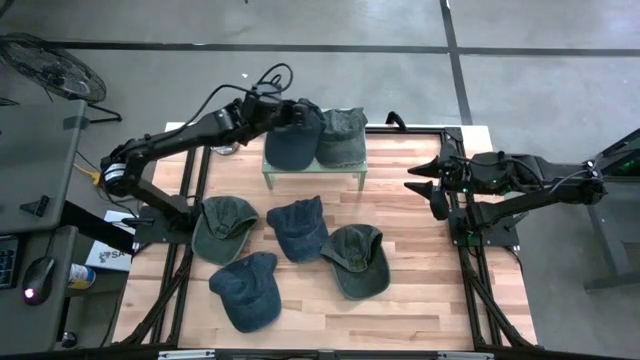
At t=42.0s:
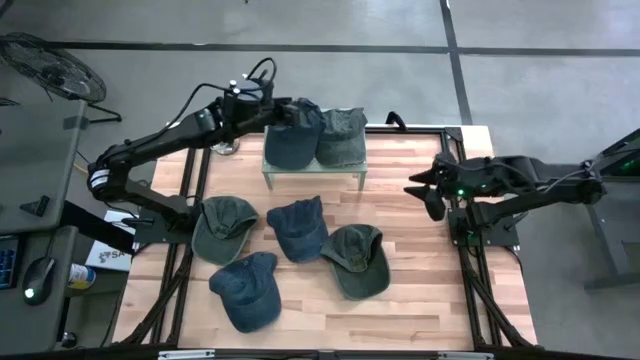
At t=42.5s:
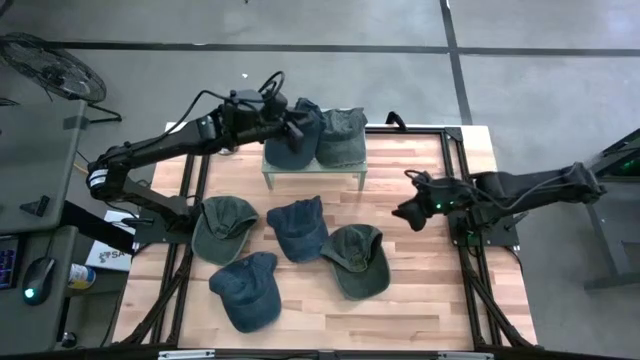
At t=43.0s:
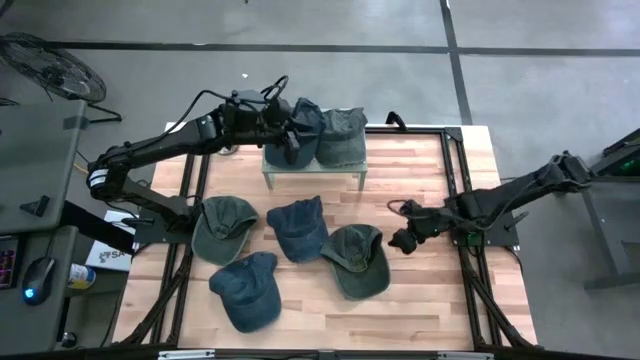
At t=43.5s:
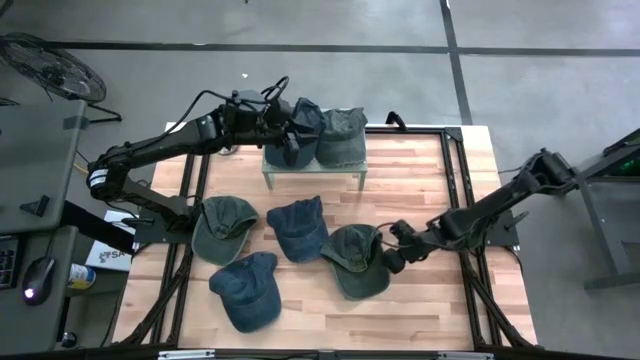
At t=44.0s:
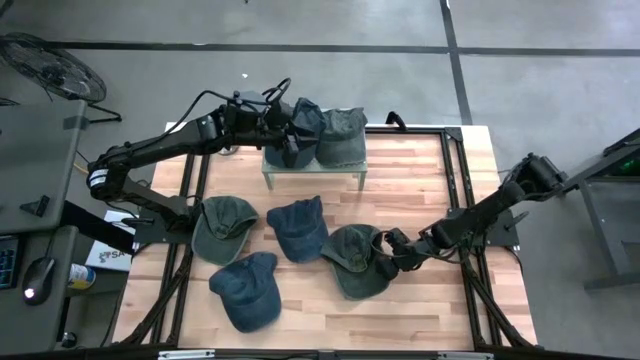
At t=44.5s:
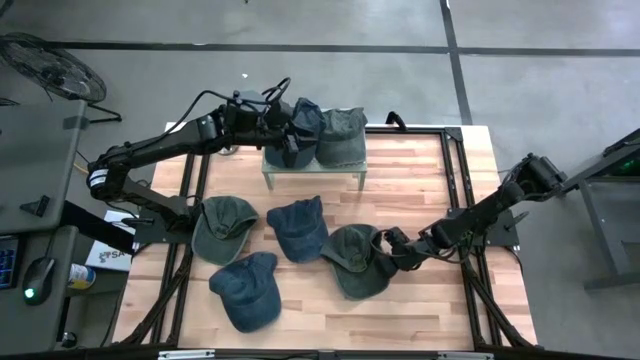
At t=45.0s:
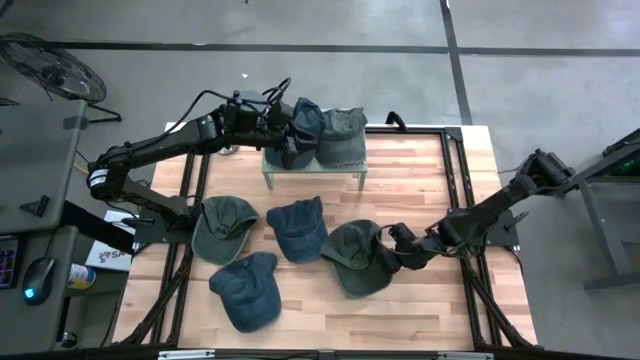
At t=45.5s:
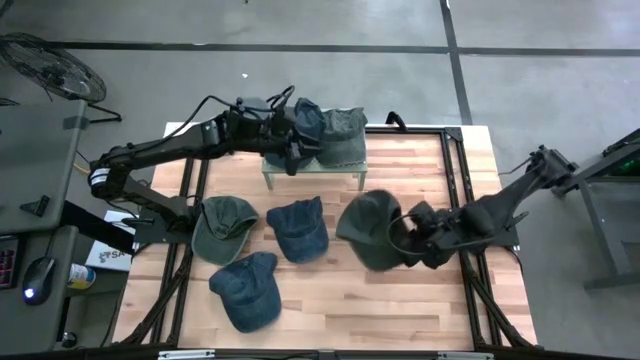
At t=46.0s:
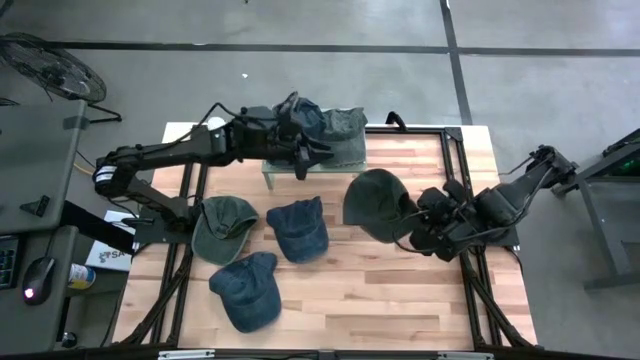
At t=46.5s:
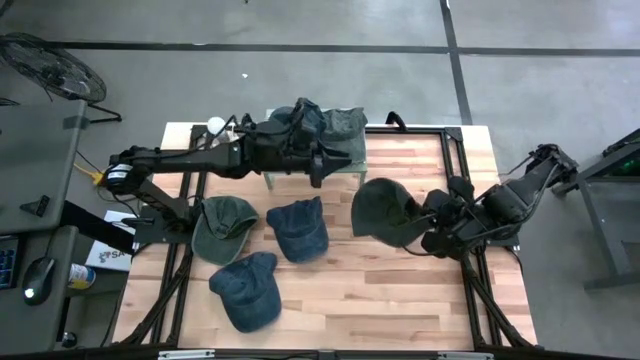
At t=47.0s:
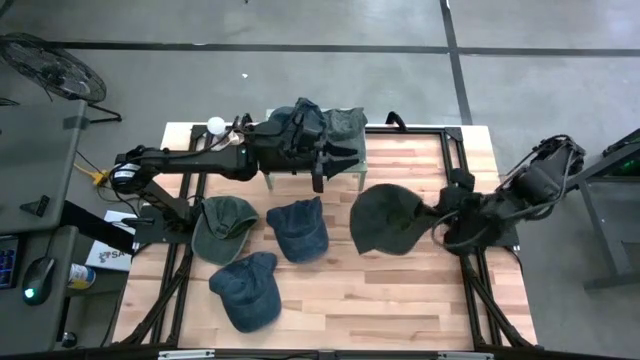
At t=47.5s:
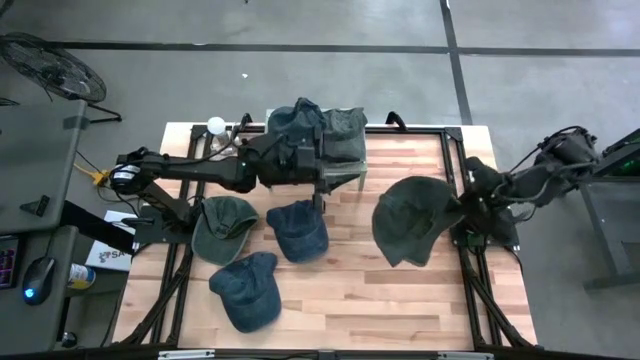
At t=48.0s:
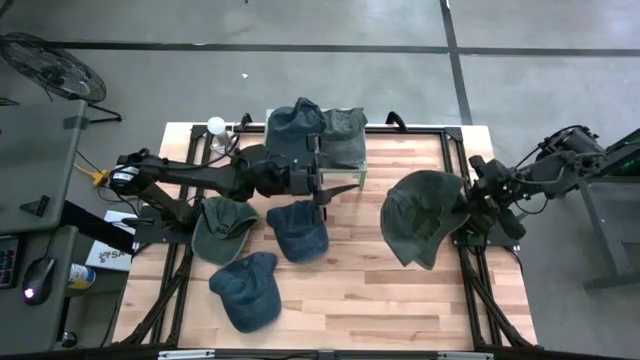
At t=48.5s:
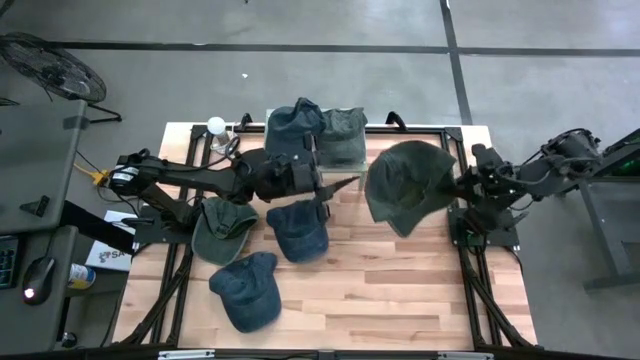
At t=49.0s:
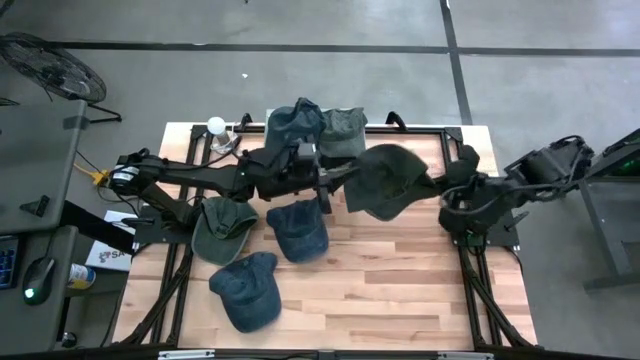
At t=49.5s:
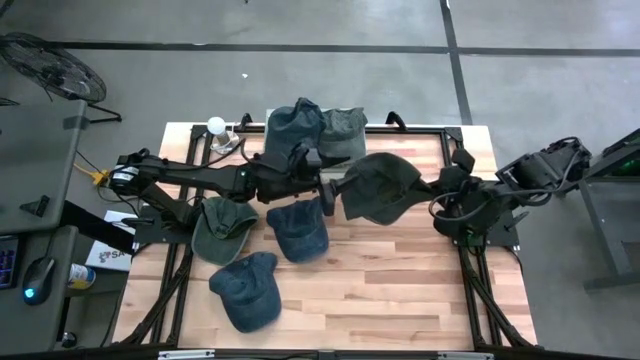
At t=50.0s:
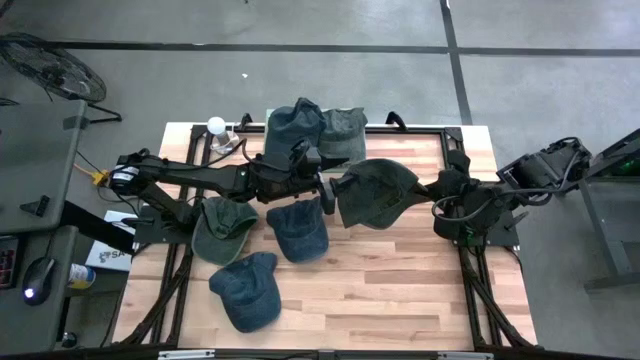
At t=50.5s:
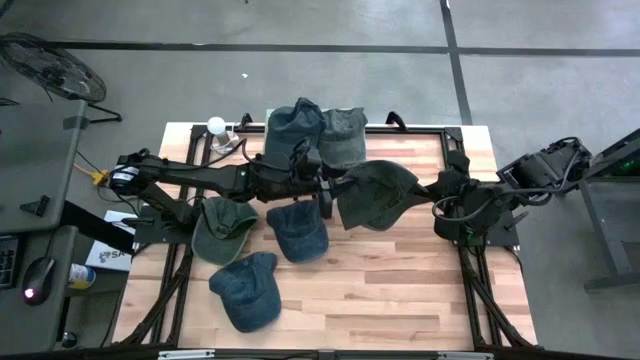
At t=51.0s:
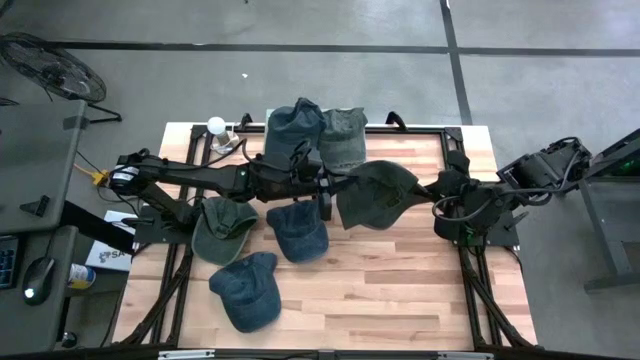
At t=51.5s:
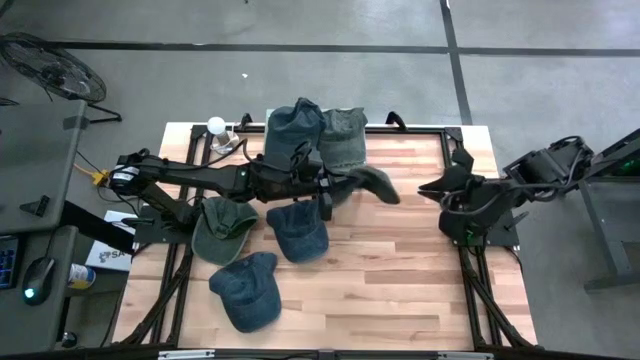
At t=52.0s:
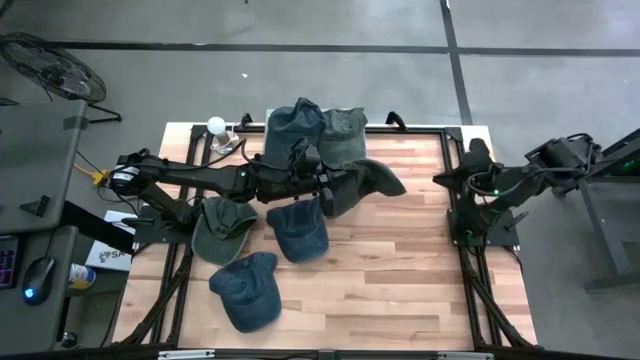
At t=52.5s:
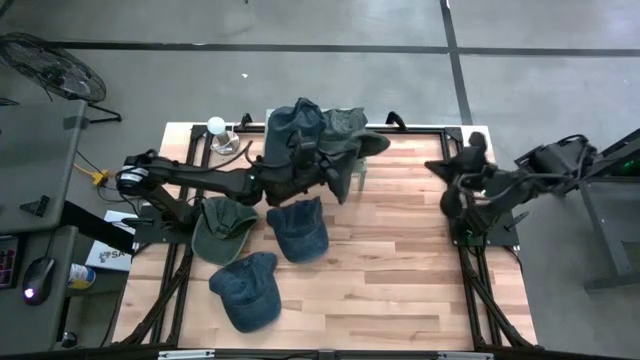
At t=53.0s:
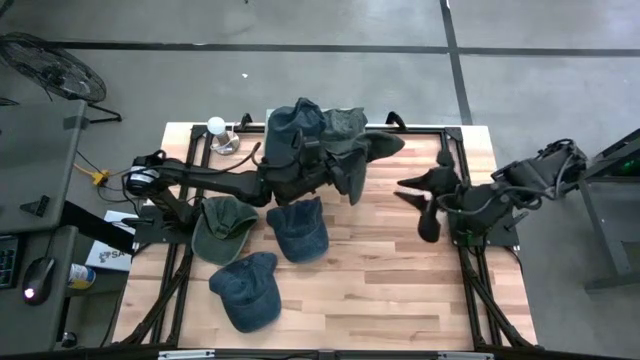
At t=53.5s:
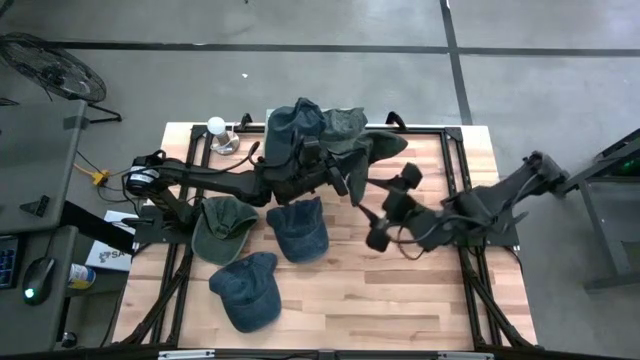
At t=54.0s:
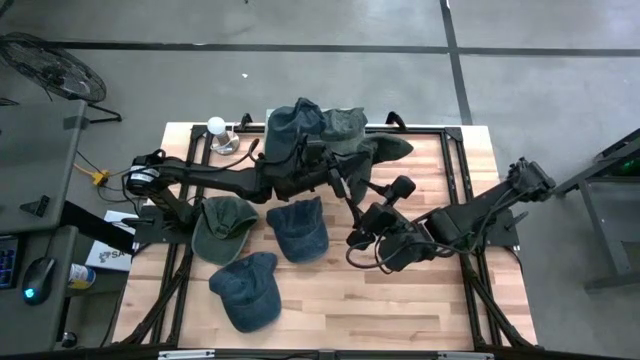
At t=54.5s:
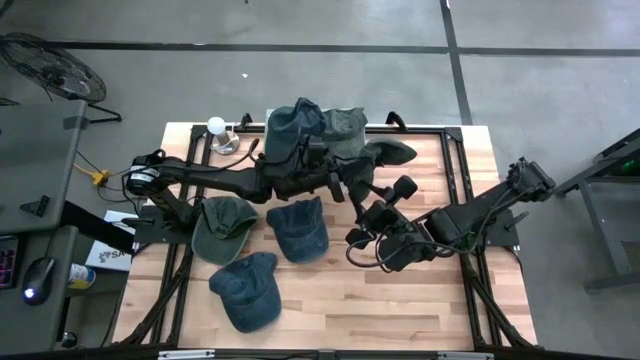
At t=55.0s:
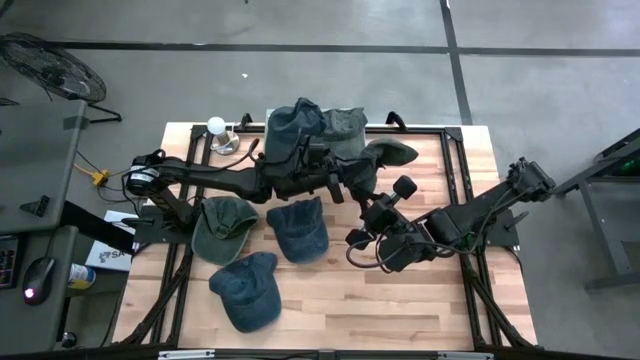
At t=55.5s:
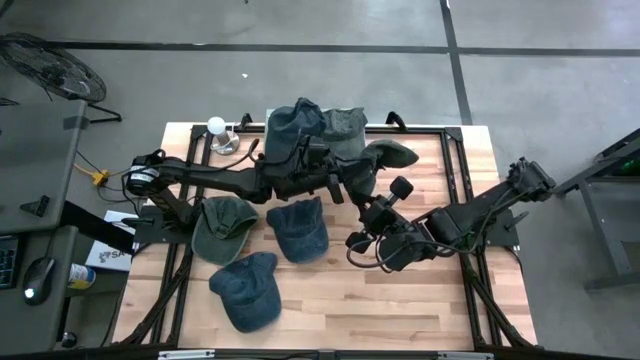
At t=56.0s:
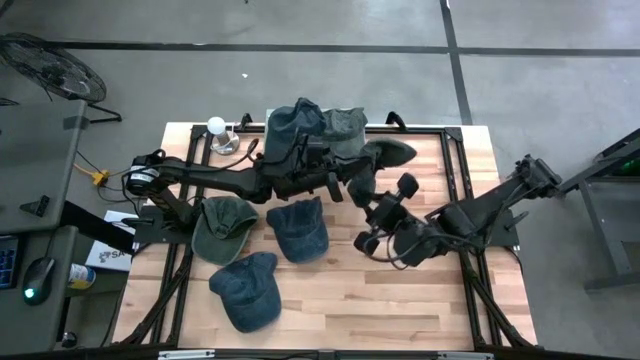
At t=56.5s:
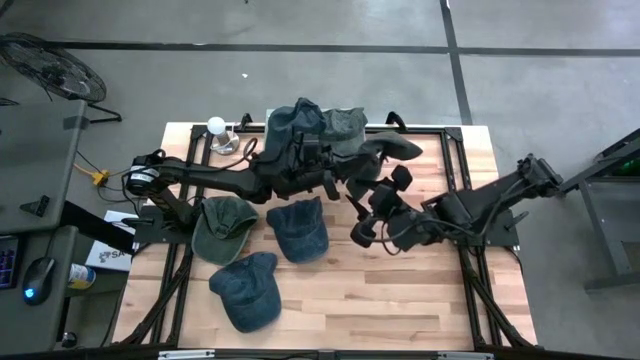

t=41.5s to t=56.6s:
Task: Pick & Place hat
Stack the right gray cap on the gray cap on the shelf

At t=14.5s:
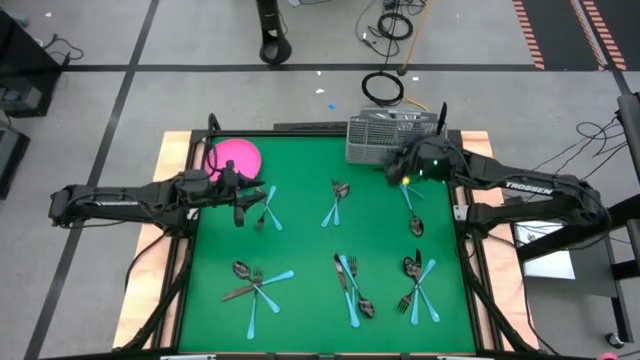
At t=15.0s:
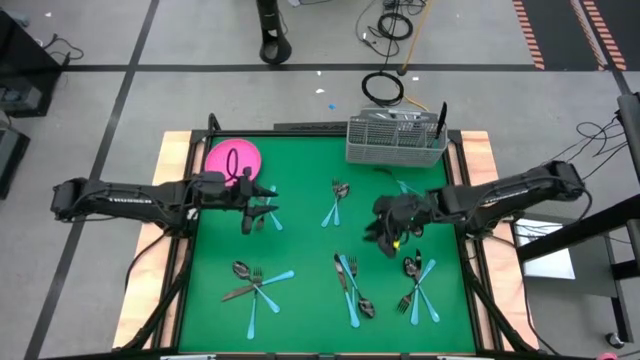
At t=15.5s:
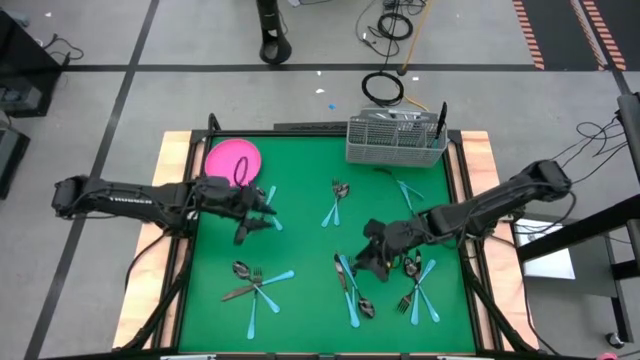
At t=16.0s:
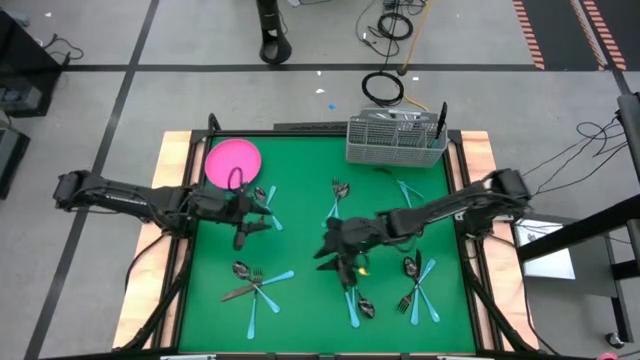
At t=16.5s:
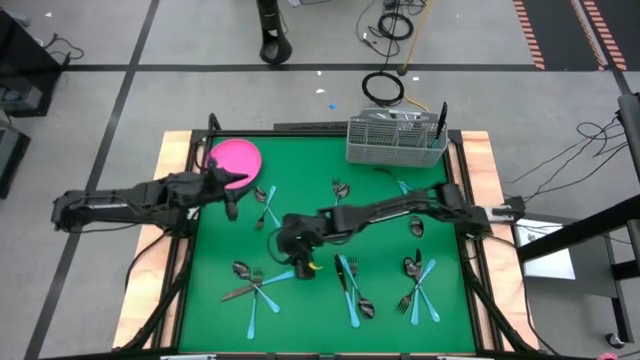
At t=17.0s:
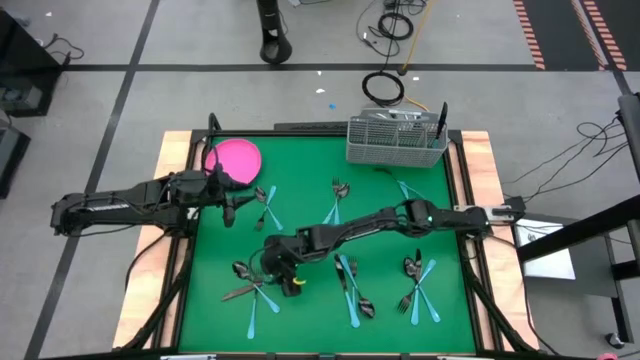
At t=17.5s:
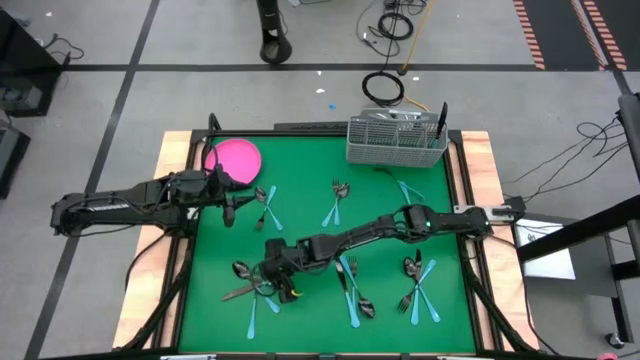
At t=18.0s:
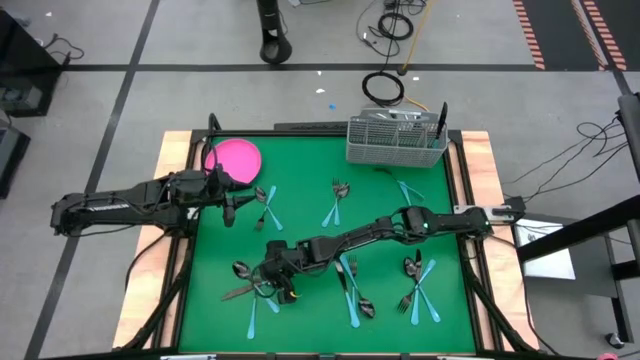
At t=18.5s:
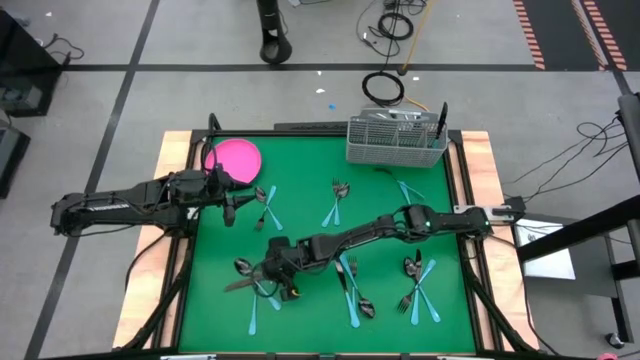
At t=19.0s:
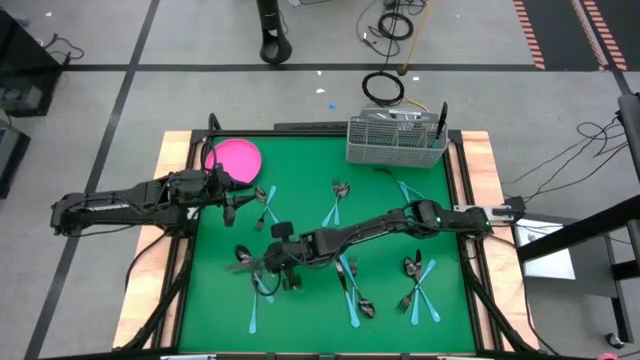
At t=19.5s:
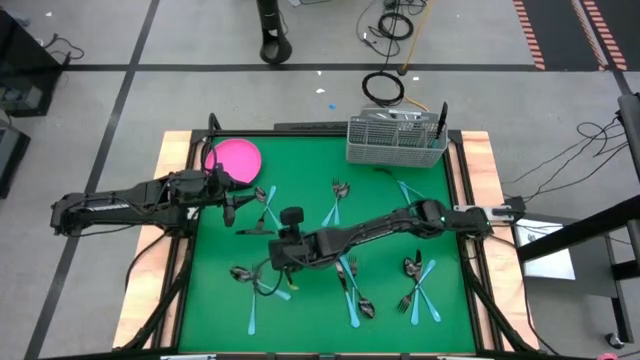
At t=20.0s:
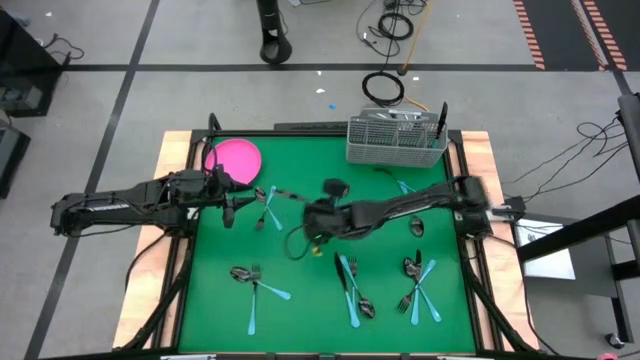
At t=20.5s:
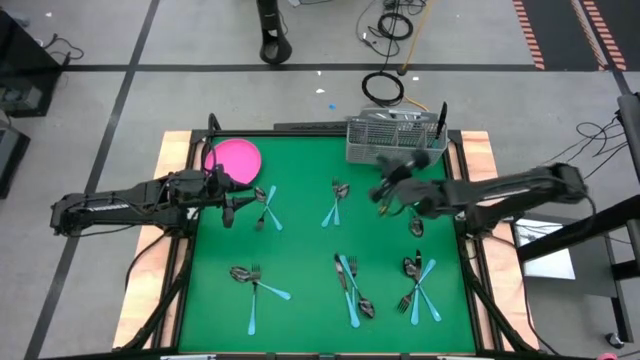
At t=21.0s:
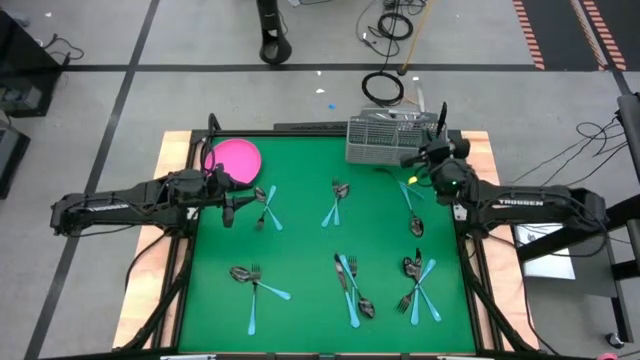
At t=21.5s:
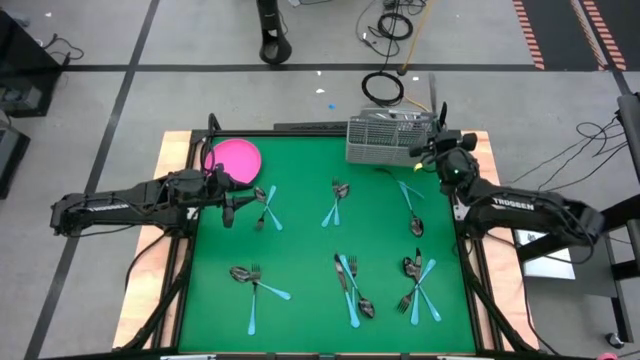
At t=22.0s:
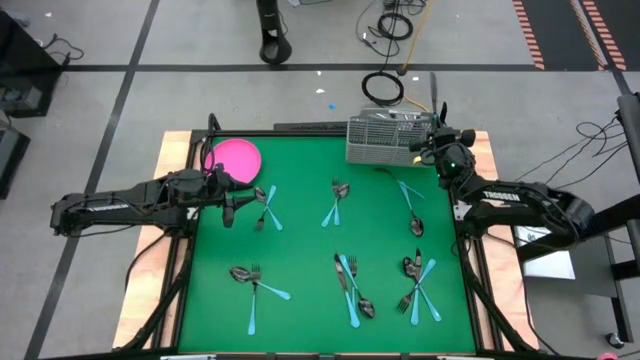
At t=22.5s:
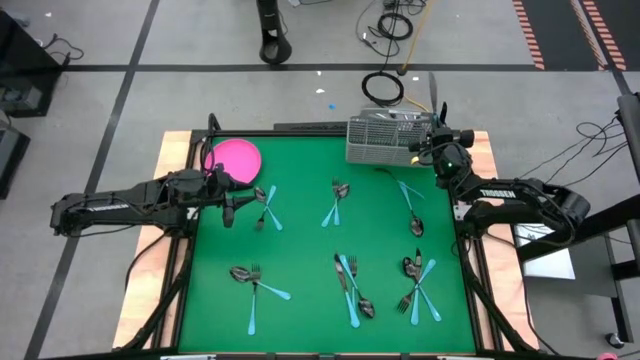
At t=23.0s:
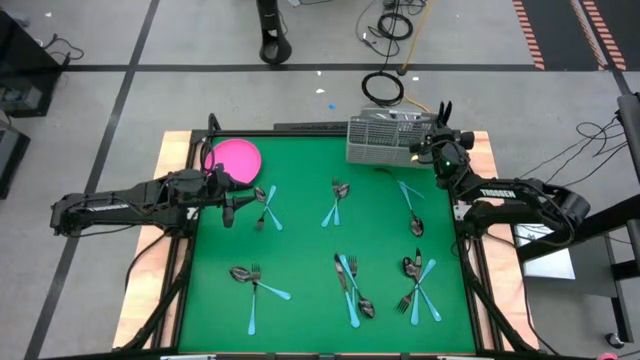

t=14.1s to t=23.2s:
Task: Sort silverware
Put the blue table knife into the gray silverware basket
